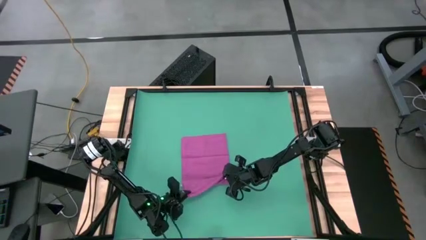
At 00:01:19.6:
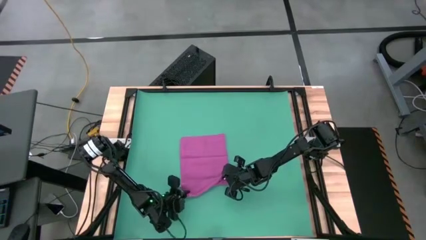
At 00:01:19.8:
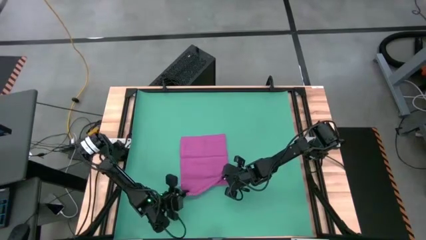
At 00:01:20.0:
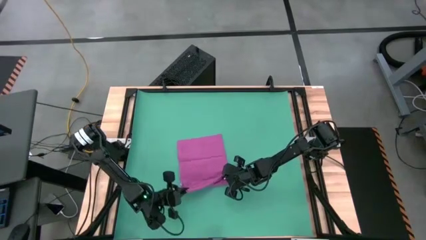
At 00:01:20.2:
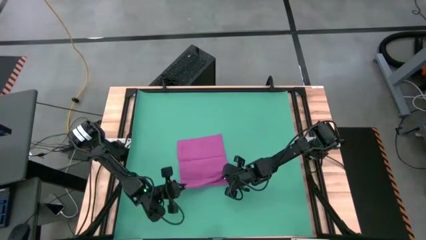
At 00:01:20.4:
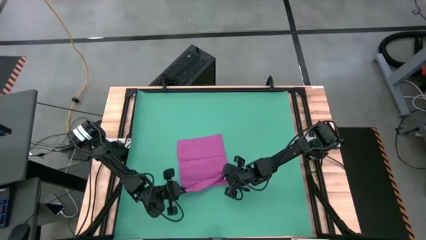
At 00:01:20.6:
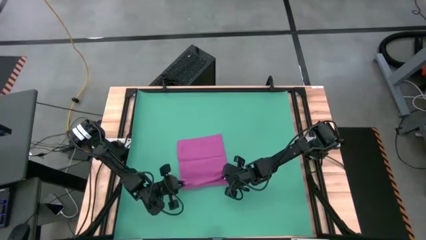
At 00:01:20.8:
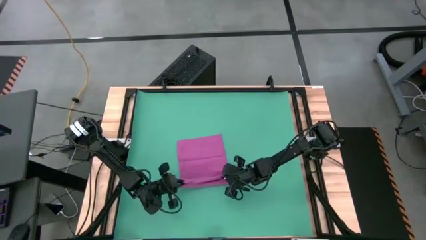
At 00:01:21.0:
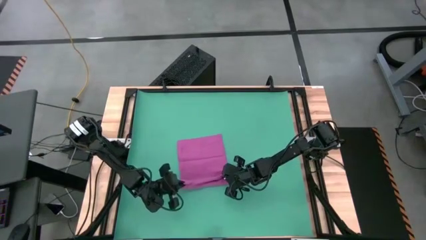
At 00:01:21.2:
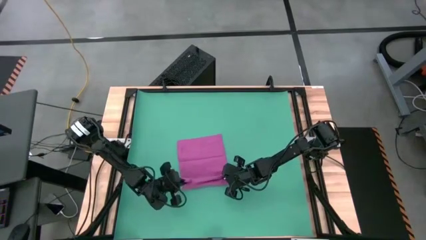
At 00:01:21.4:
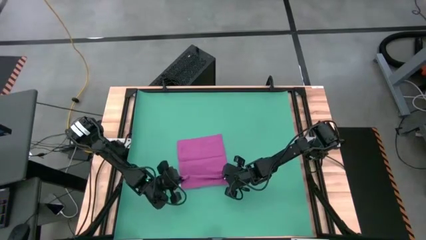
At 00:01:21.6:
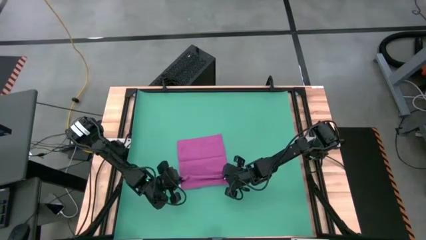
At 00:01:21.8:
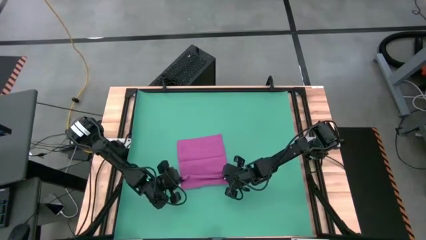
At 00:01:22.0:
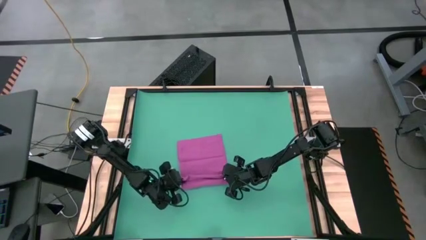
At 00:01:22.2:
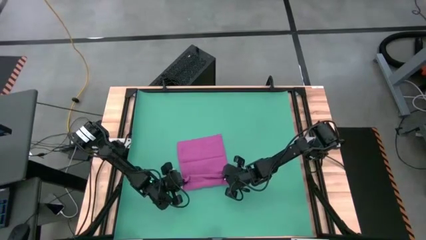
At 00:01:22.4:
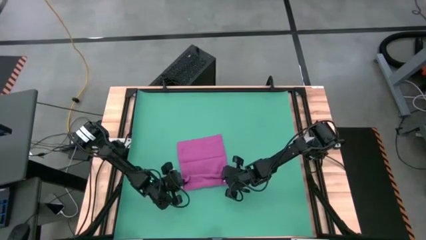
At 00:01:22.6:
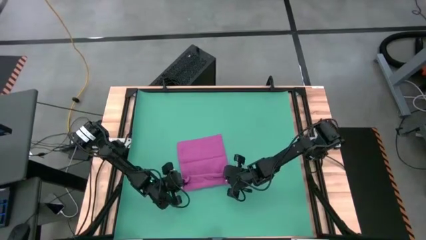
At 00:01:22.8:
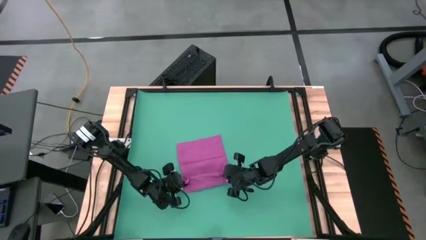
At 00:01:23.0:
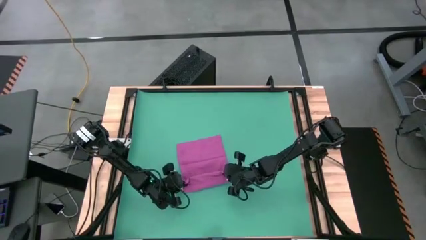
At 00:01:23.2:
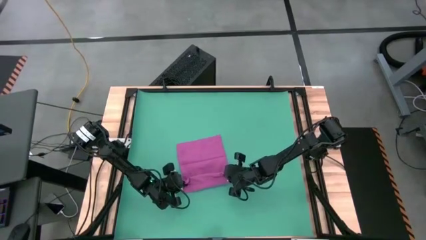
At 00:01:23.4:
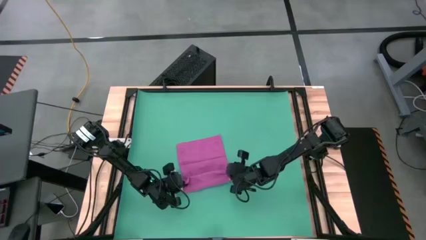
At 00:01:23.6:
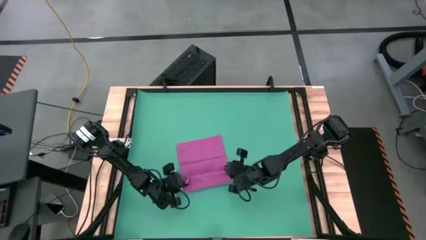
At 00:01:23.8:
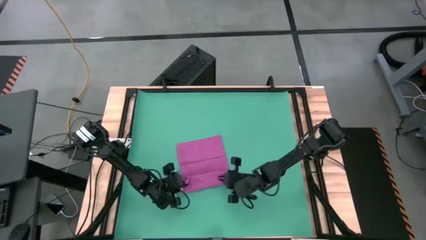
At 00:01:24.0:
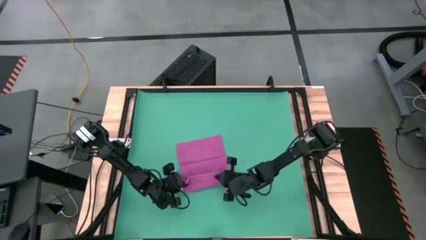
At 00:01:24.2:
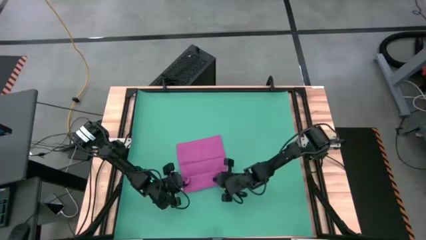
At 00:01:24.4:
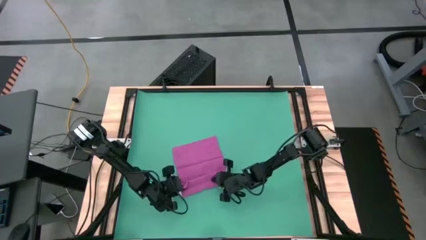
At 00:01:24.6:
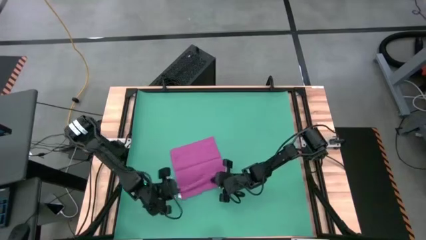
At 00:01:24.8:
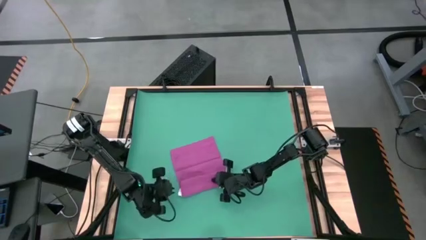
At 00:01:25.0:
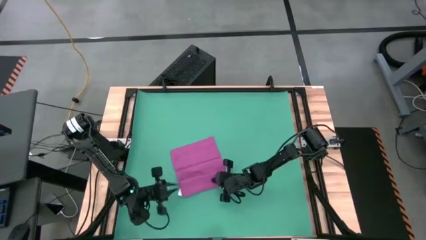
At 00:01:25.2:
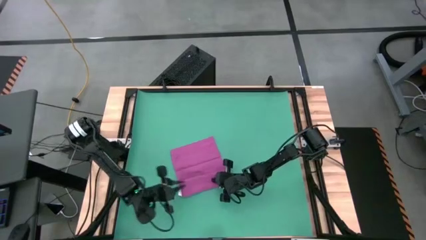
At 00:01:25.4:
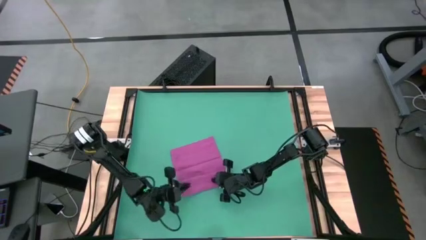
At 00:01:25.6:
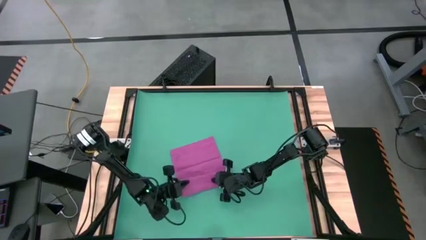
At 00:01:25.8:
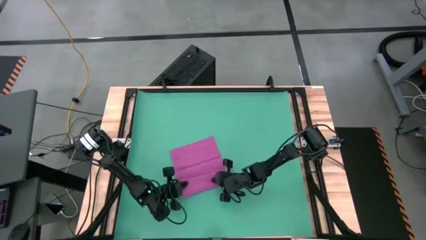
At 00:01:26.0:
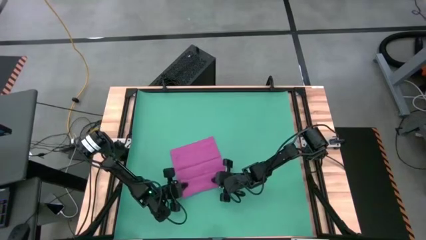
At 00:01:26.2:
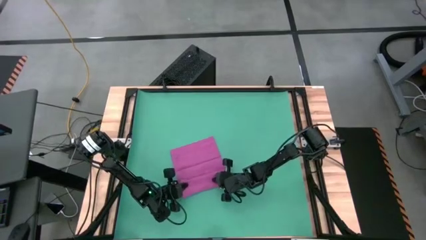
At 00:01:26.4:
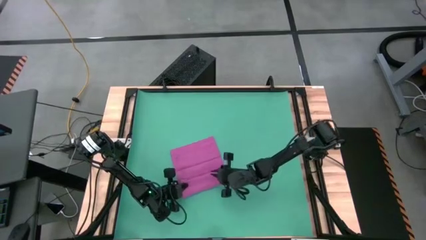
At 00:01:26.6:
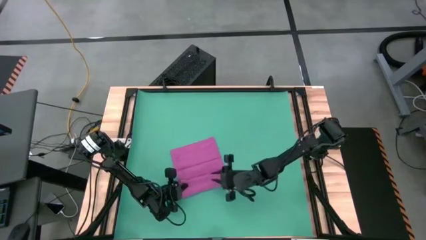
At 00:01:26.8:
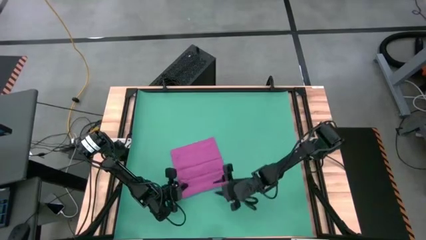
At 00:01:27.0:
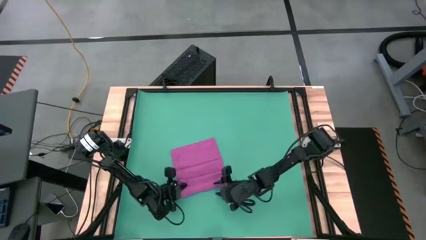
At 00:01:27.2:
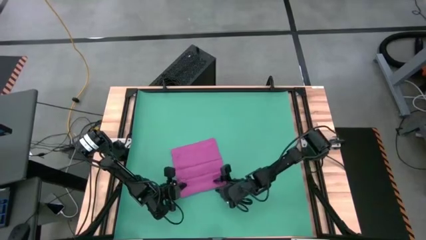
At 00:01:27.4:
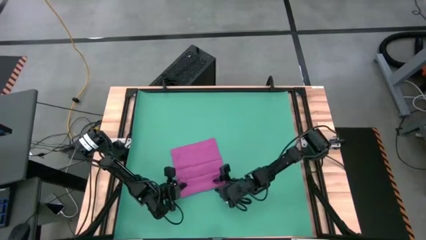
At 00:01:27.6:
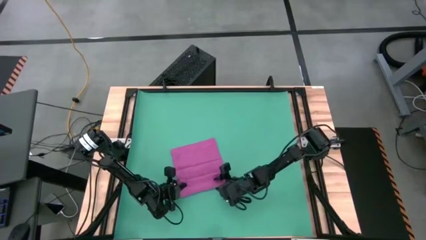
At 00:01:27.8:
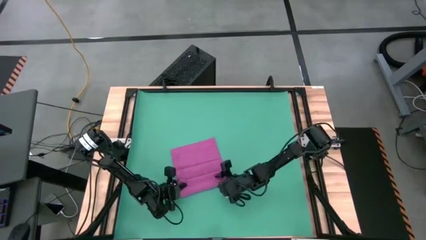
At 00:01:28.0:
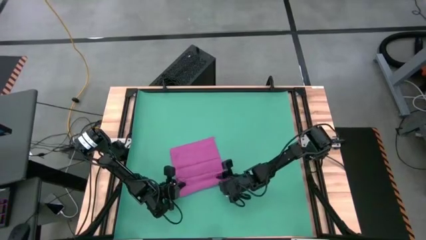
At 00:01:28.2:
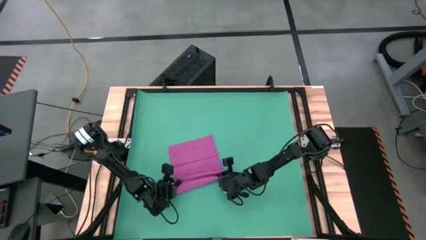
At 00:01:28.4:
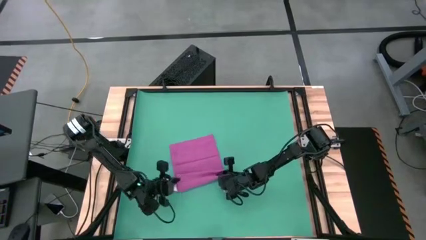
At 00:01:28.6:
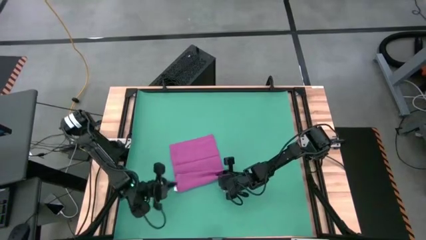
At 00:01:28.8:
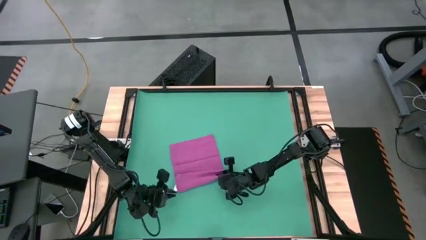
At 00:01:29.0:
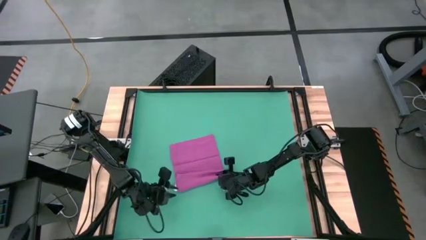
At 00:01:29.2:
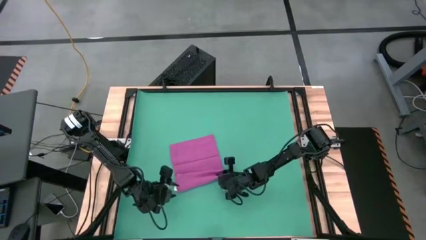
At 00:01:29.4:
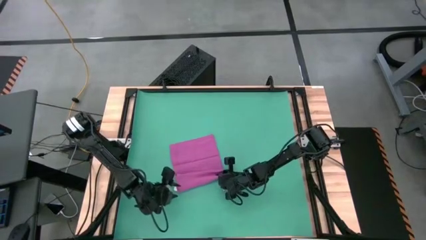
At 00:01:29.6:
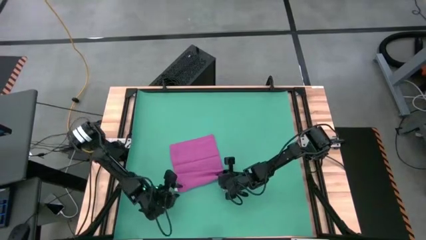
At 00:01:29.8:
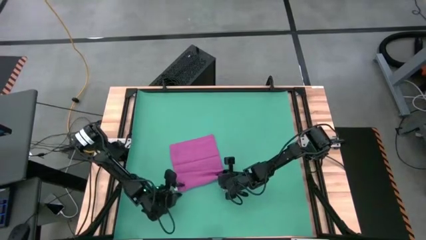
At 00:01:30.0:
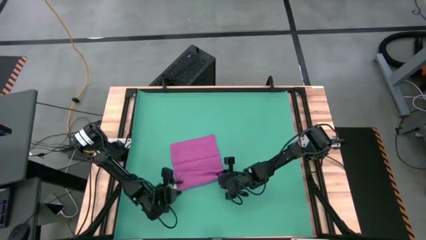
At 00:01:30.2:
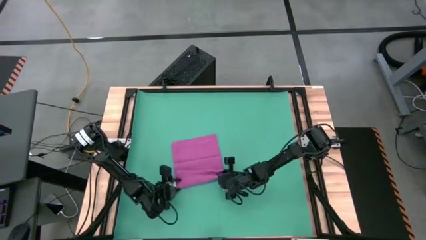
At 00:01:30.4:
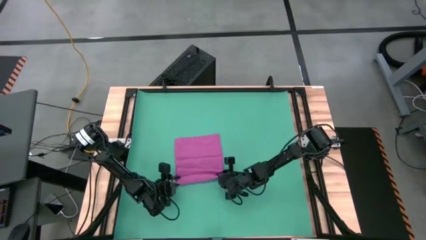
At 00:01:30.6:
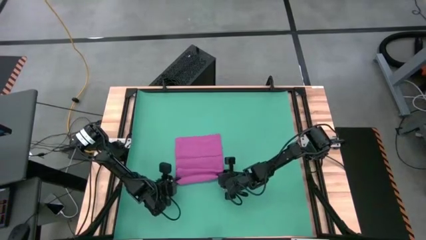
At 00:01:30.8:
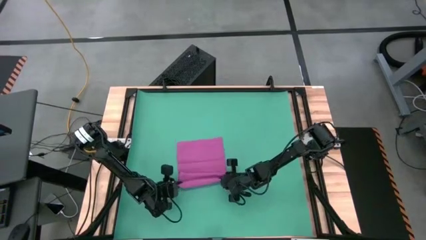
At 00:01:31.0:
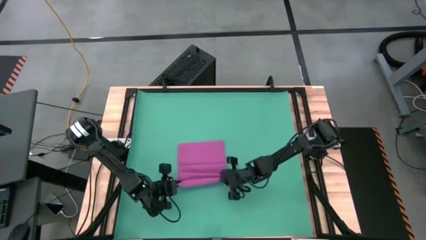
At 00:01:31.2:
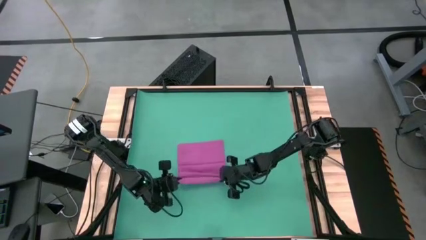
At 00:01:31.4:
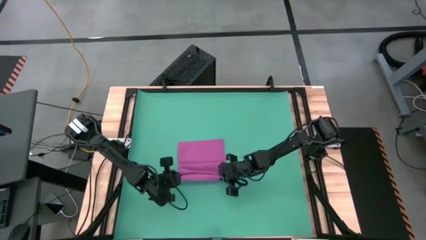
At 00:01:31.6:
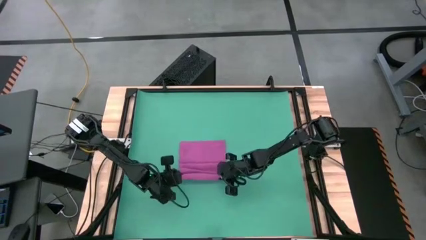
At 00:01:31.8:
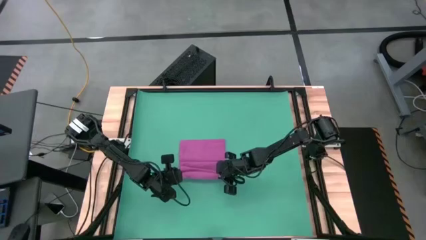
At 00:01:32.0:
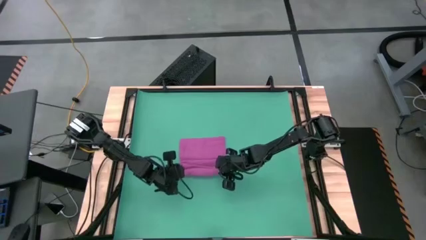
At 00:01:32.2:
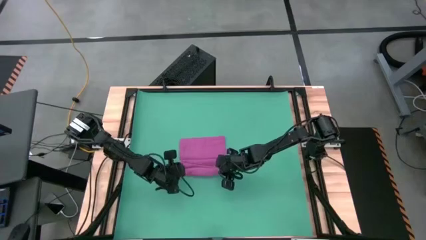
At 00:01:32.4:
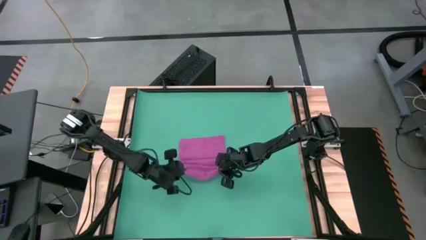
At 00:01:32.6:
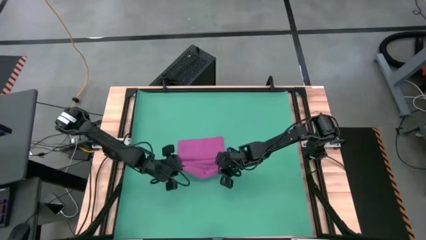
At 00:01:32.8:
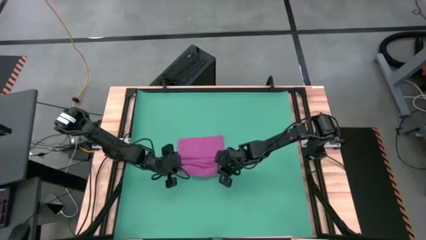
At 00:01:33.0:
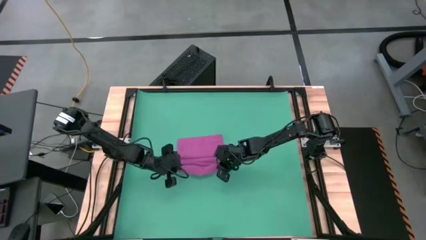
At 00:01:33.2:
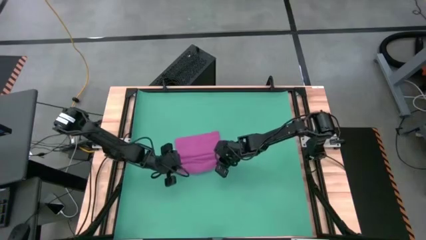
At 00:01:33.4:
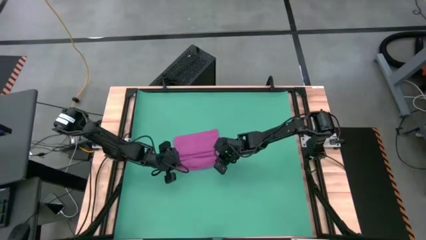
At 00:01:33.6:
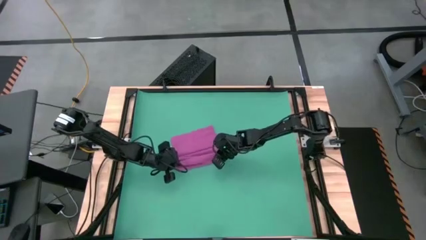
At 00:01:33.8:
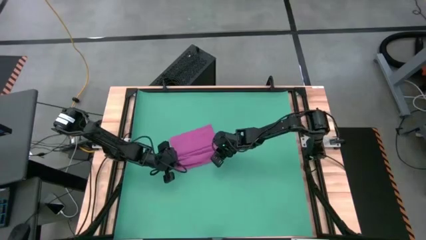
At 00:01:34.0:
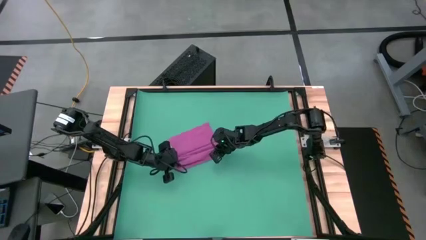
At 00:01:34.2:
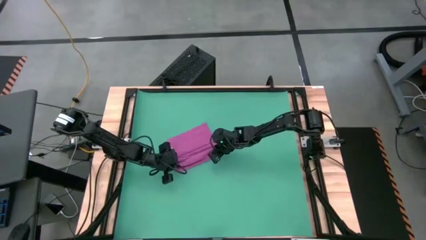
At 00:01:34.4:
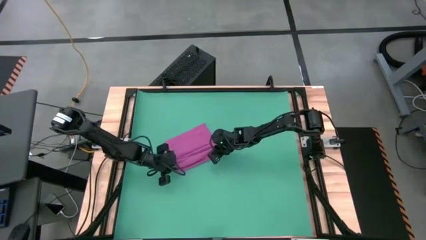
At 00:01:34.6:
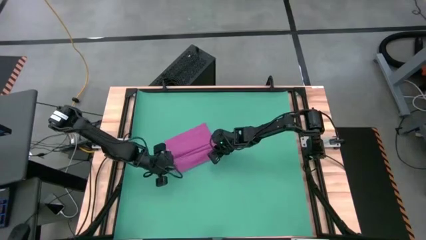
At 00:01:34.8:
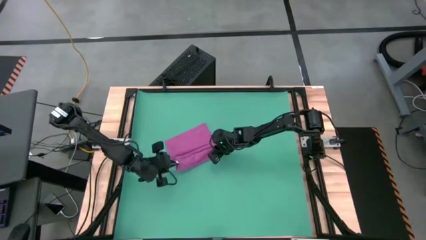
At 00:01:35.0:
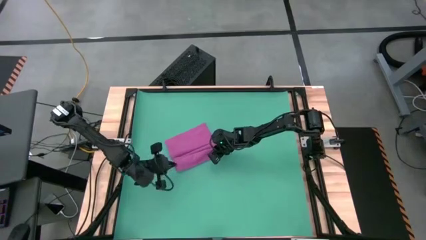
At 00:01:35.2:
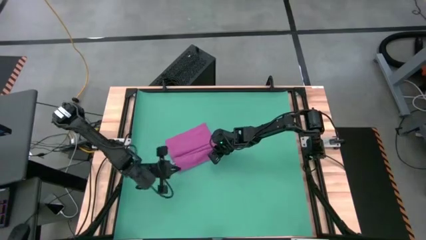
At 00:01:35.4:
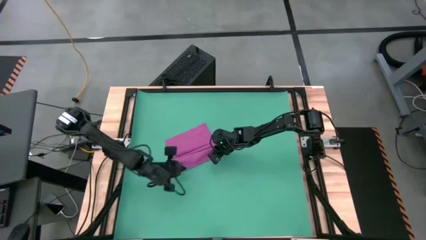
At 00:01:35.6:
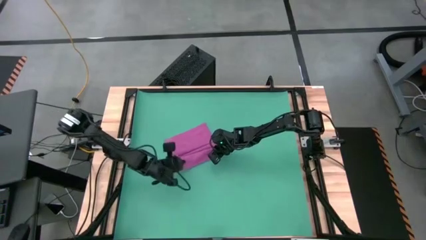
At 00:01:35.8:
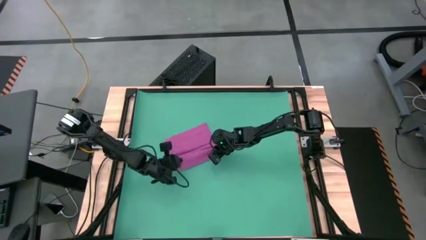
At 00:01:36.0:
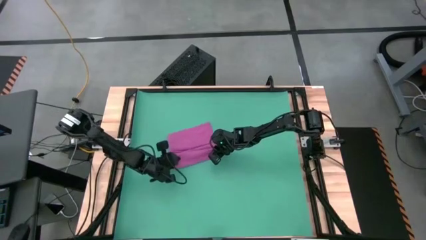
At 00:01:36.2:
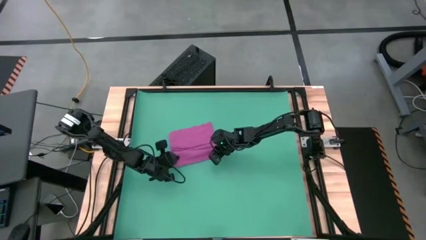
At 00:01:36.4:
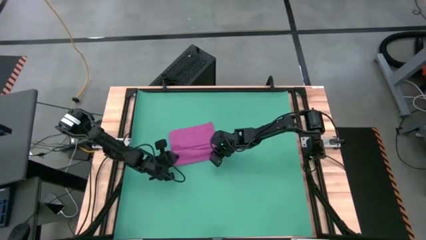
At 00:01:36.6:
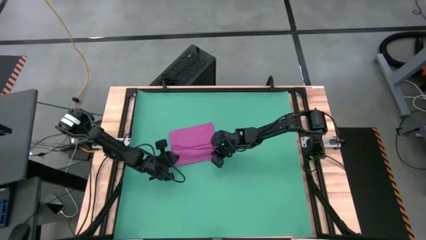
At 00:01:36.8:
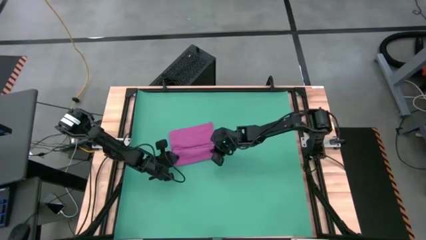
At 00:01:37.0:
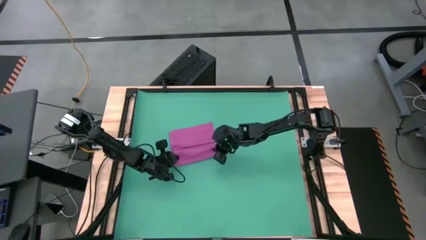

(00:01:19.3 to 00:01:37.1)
Task: Roll towel
Roll the pink towel
